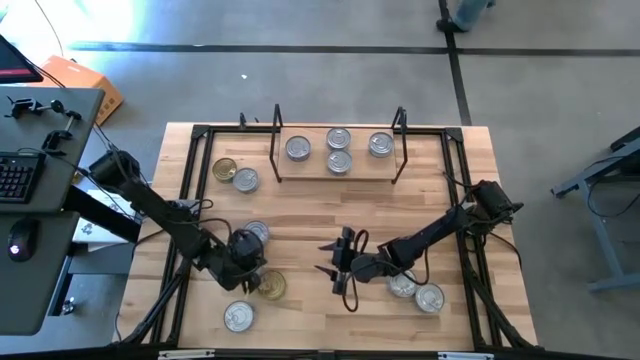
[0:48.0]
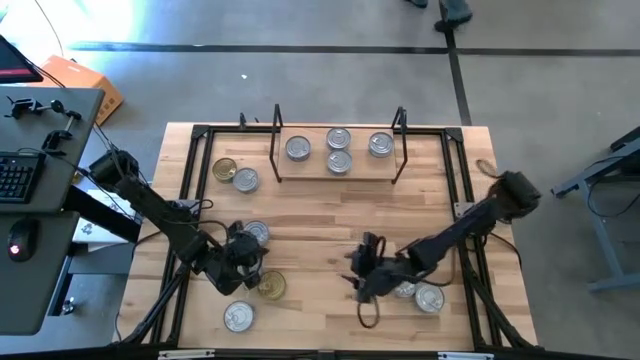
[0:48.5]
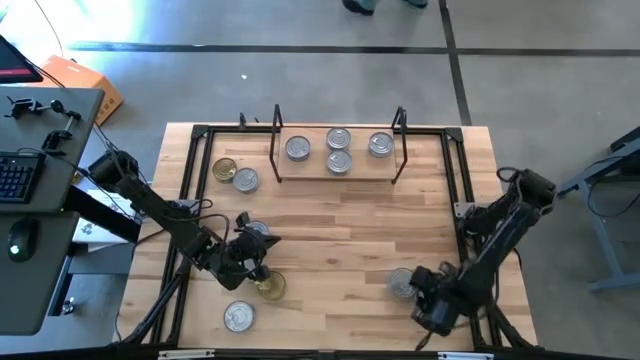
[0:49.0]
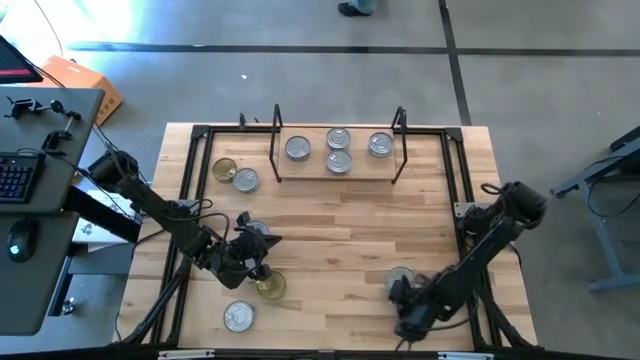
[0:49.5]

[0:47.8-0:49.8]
Task: Stack canned seafood by type on shelf
Adjust the blue tuna can

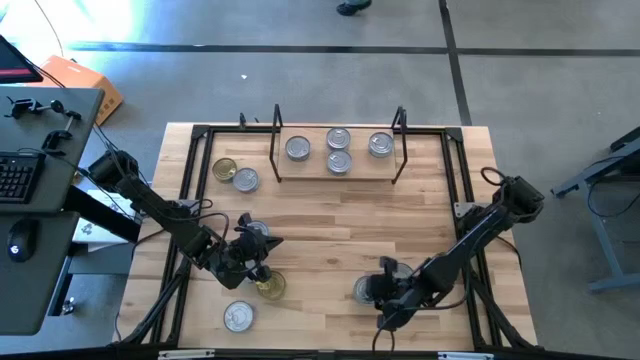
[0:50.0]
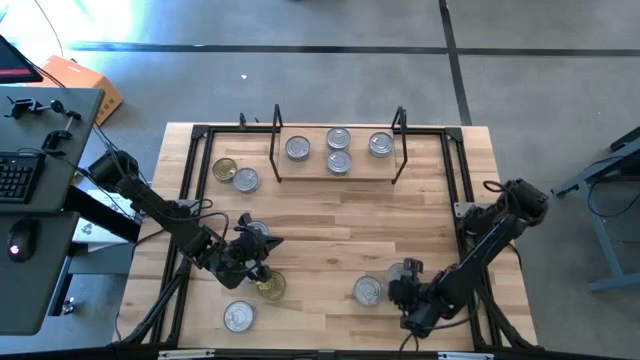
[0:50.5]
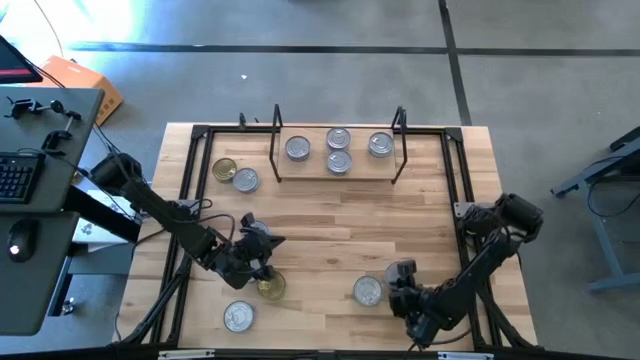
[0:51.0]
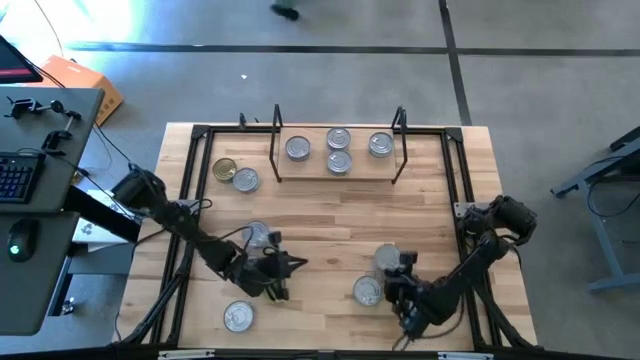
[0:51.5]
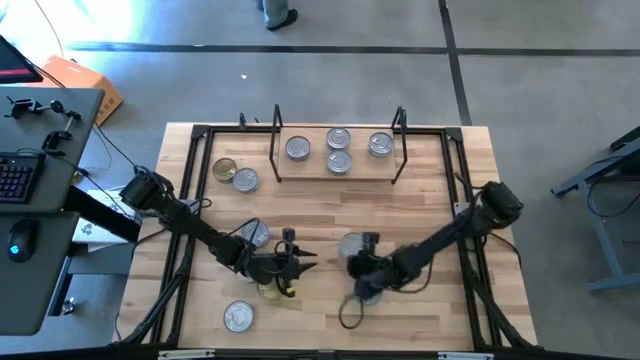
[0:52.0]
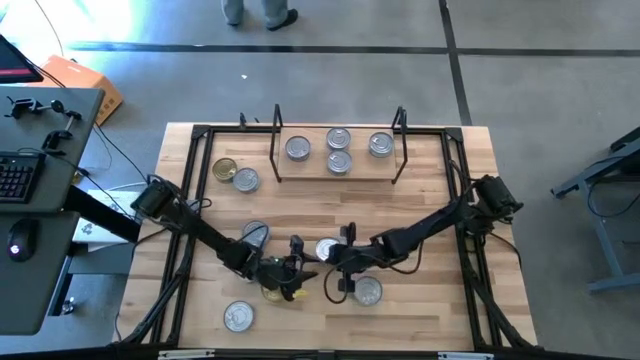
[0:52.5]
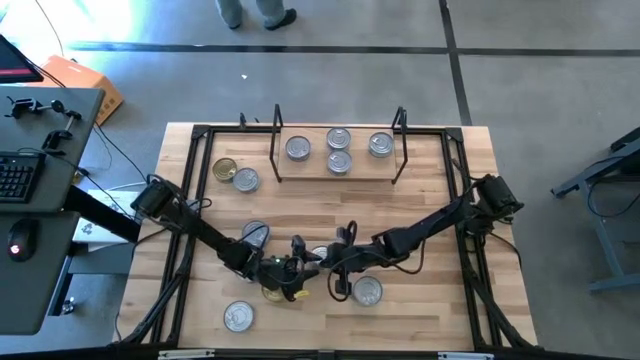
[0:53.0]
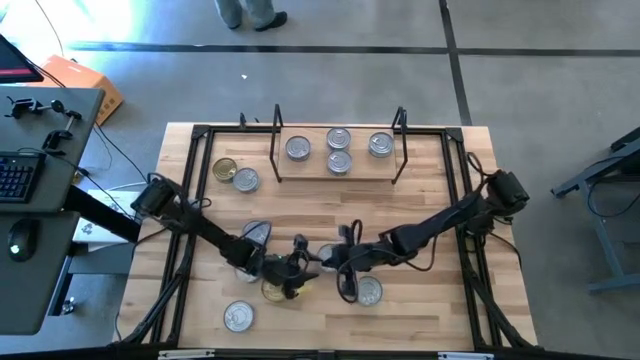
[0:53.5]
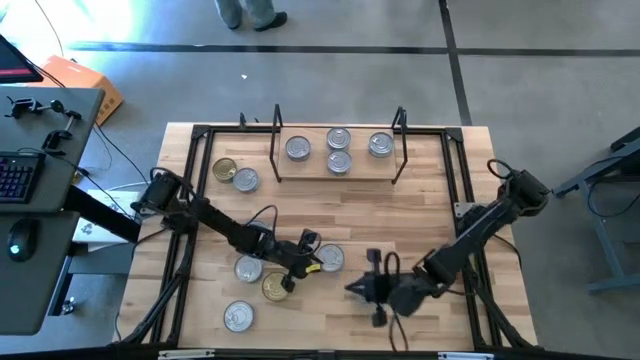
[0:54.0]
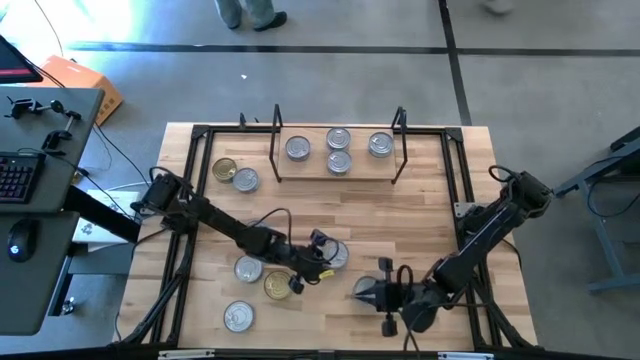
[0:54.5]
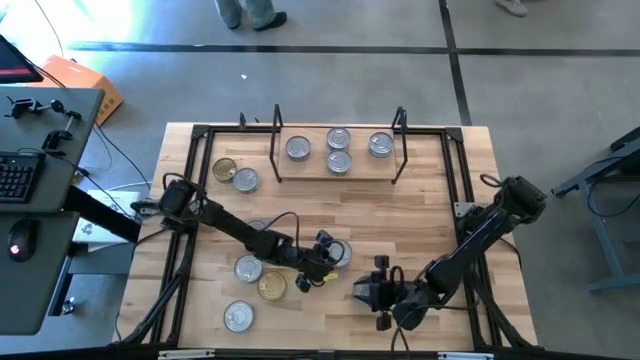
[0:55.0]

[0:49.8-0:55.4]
Put the yellow and blue tuna can on the shelf

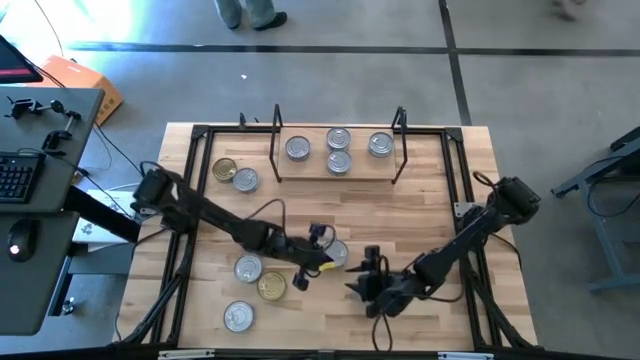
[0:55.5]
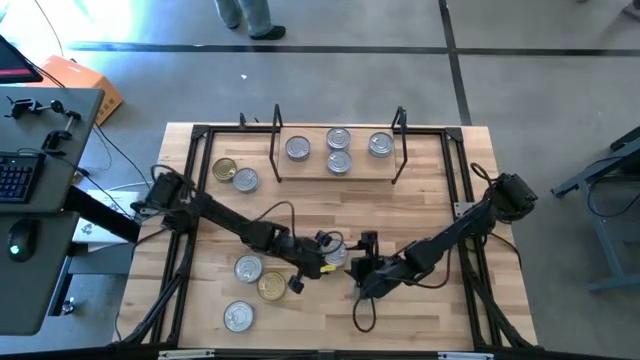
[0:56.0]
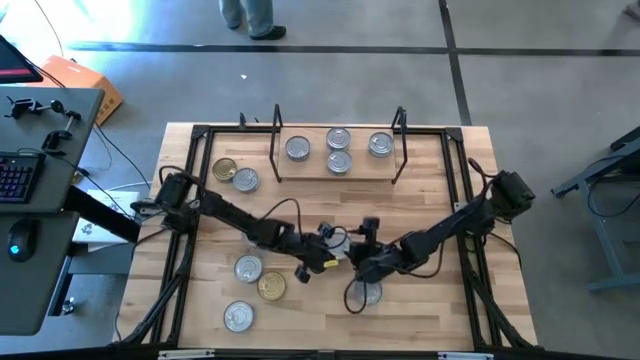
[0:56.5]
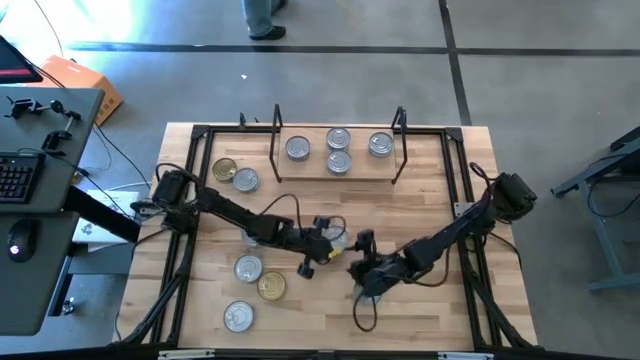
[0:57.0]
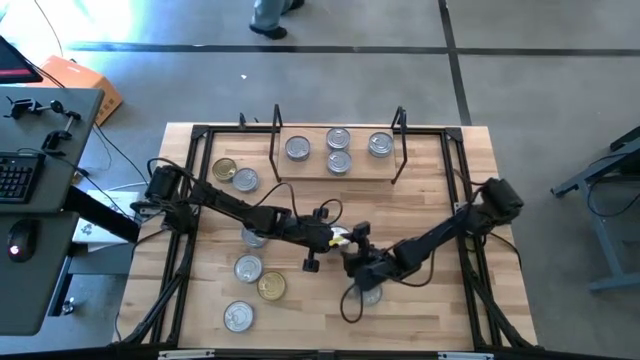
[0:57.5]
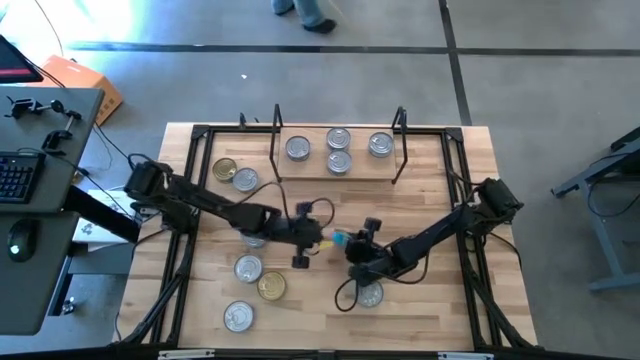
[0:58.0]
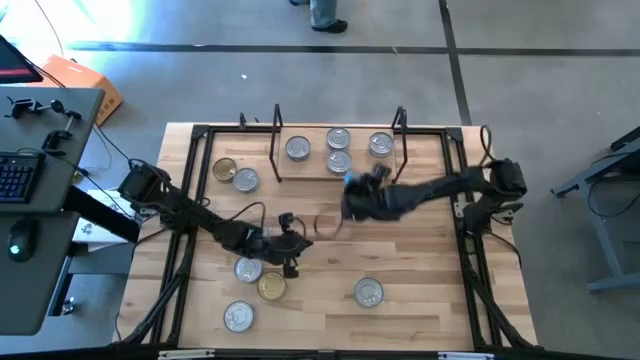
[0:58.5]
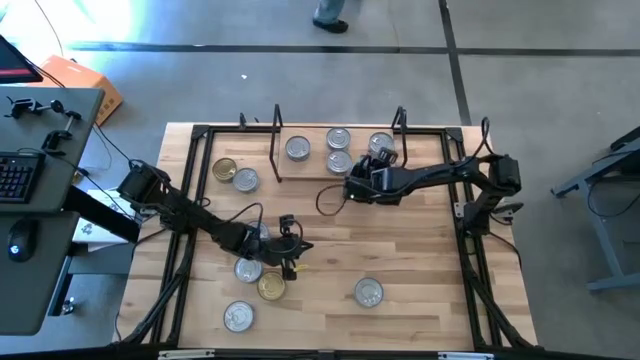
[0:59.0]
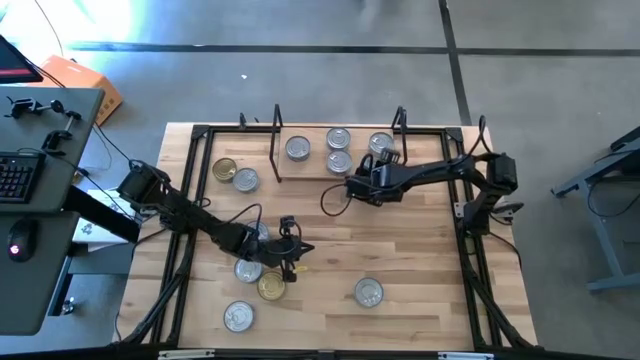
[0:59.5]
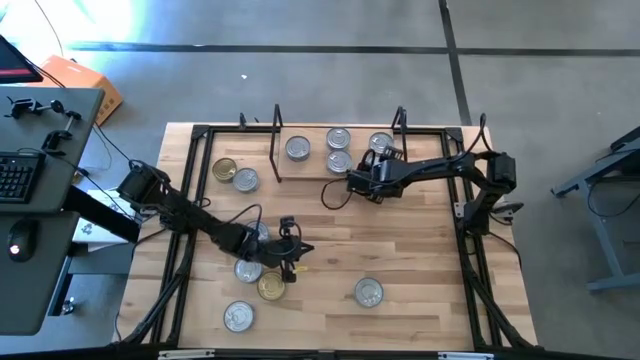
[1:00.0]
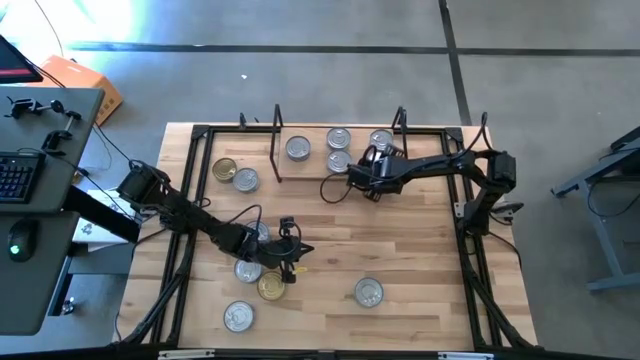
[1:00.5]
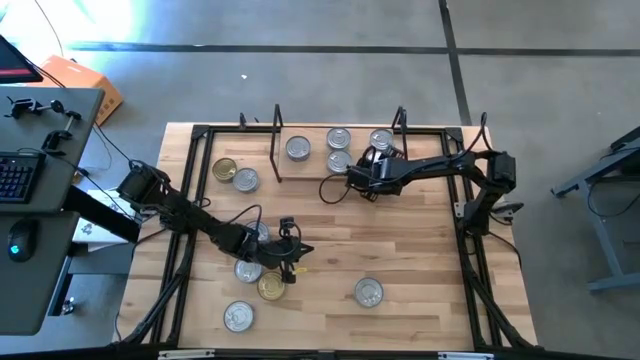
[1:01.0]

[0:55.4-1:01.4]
Put the yellow and blue tuna can on the shelf

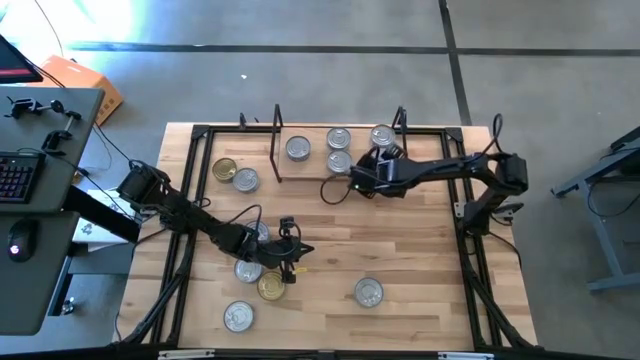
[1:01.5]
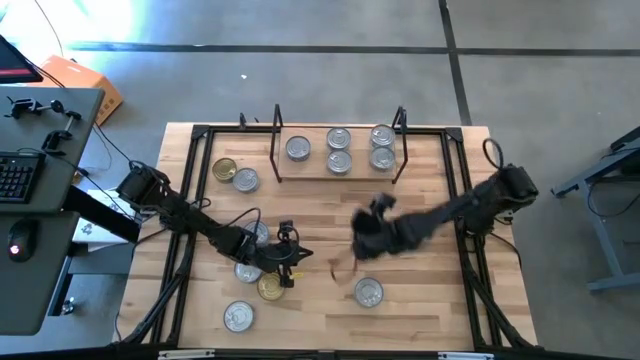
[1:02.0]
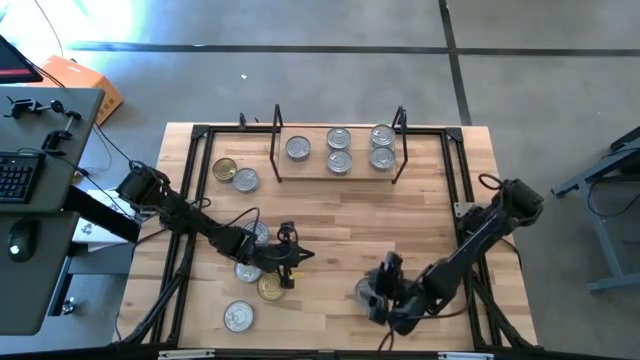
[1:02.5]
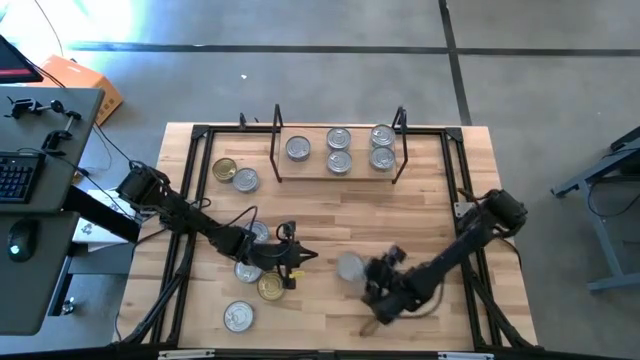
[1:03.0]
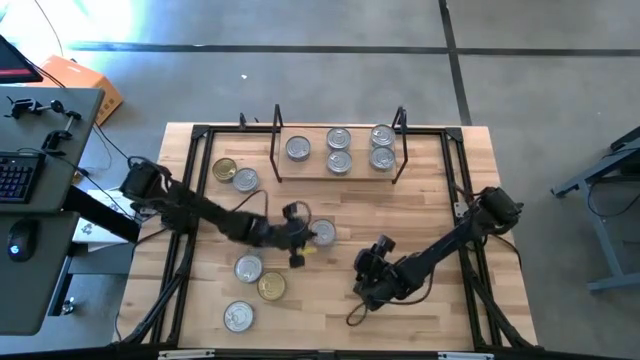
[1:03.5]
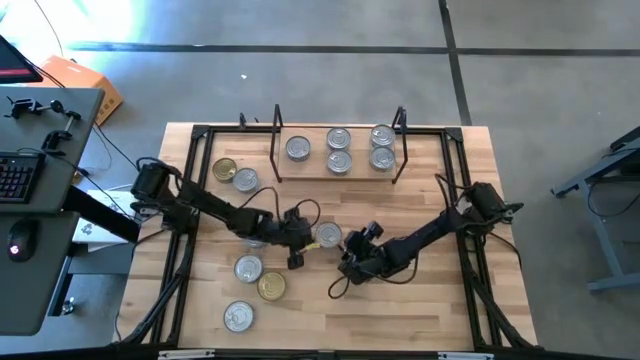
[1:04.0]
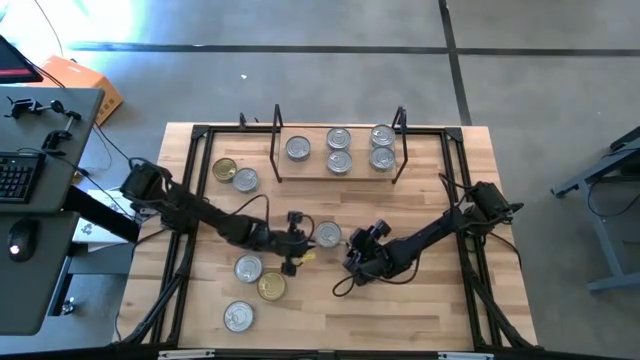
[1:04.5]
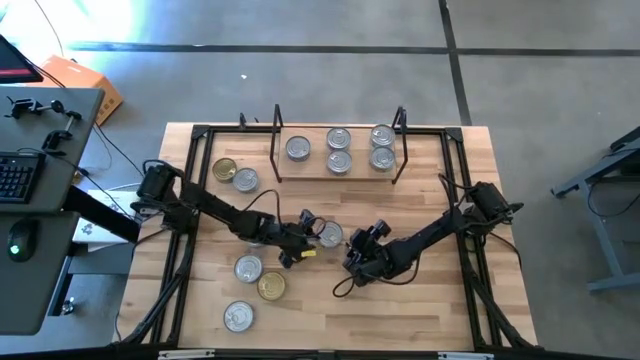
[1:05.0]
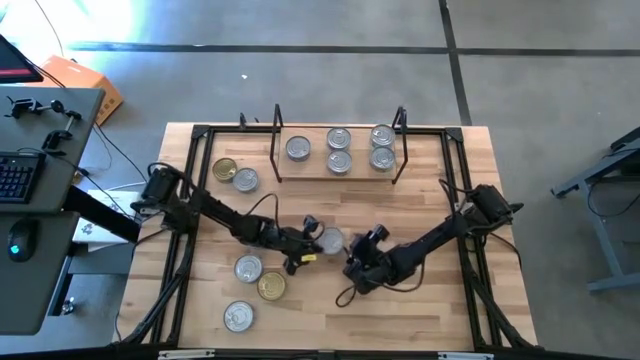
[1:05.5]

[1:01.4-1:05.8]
Put the blue tuna can on the shelf

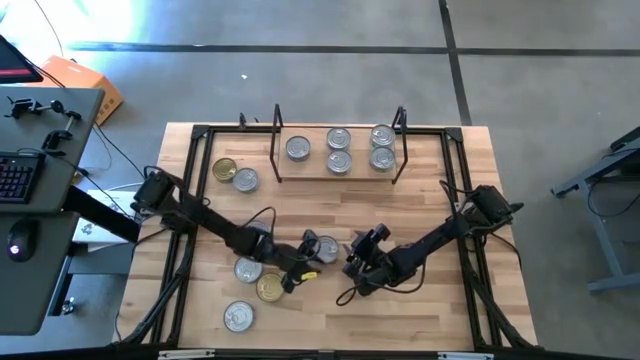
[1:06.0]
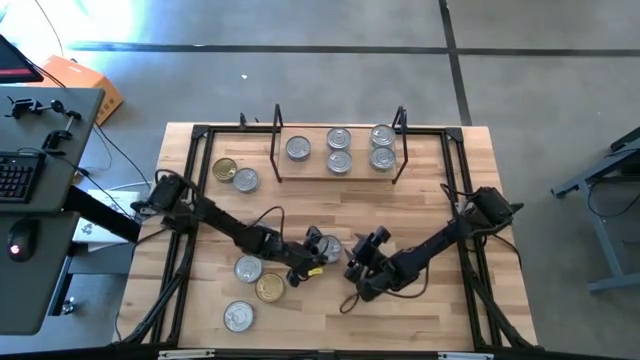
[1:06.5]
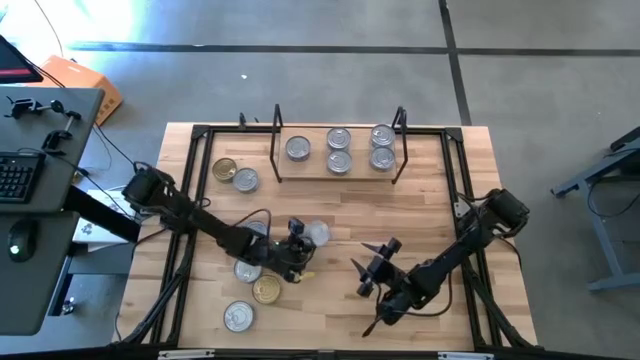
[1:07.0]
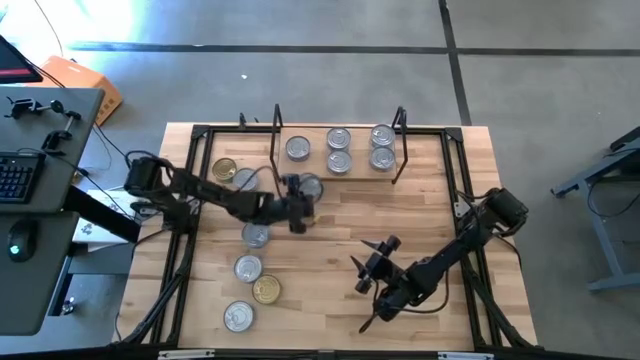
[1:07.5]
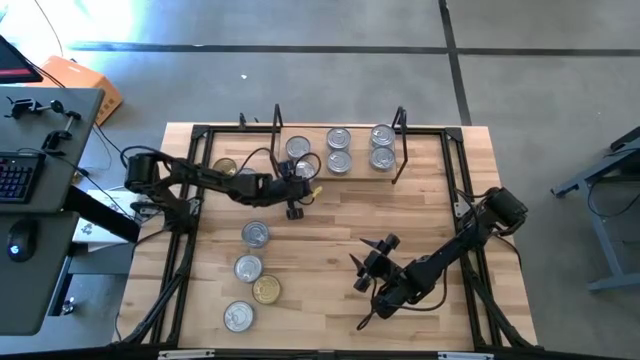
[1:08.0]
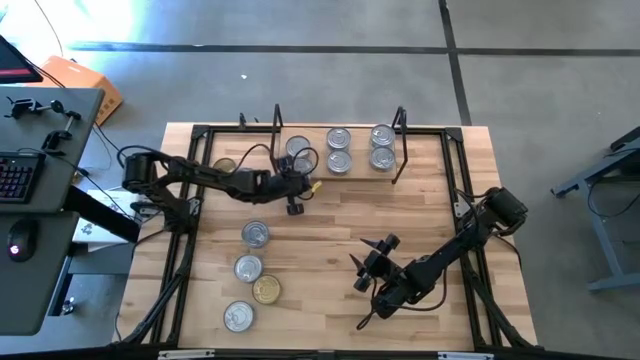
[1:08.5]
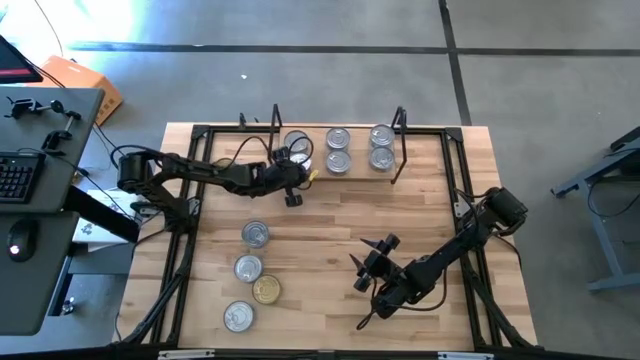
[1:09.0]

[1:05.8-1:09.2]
Put the blue tuna can on the shelf

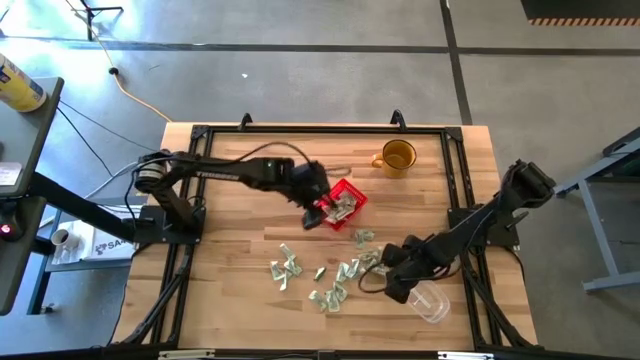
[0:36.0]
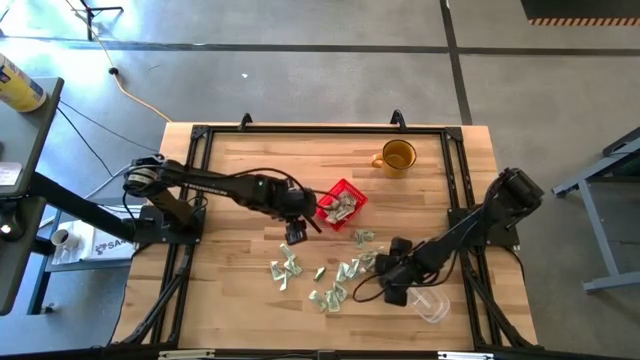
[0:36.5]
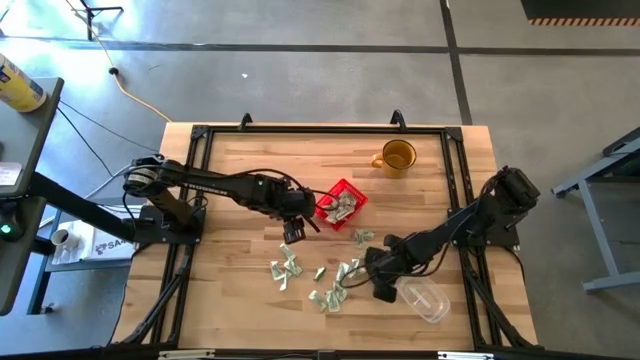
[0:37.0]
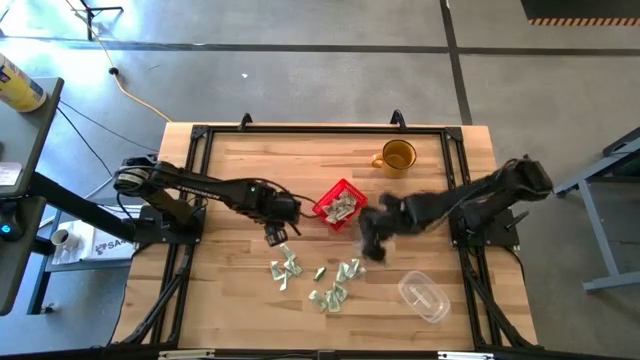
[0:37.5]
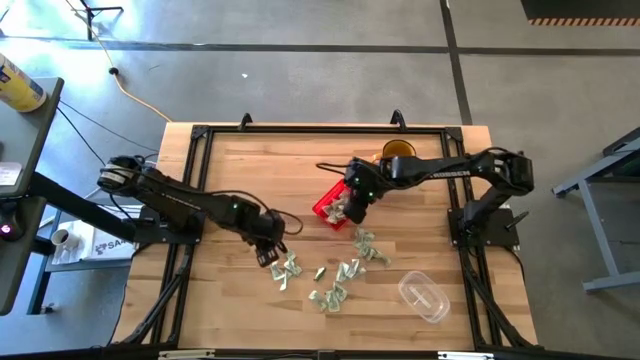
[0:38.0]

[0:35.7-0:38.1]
Task: Pick and place items into bin
Put the white stevia packet into the red bin
